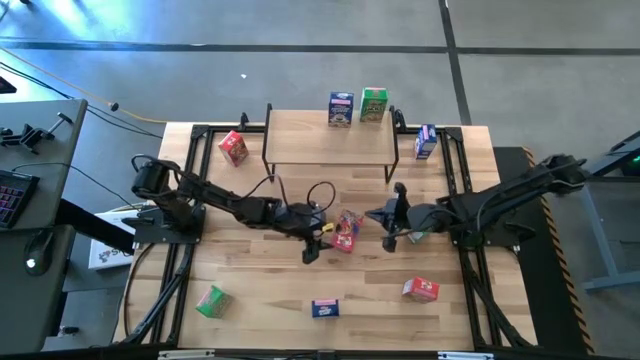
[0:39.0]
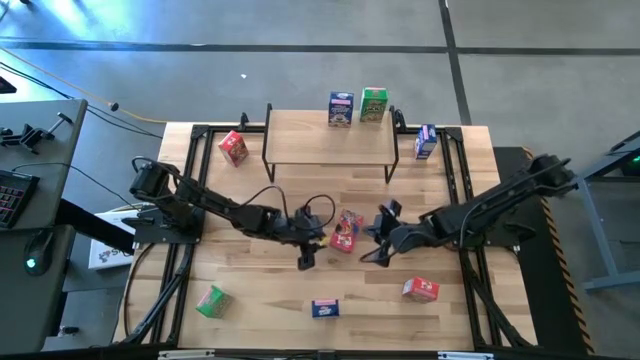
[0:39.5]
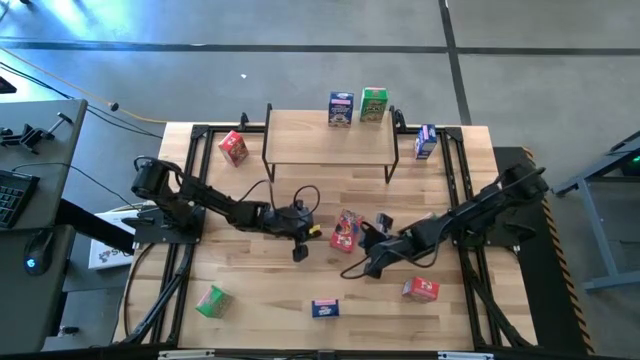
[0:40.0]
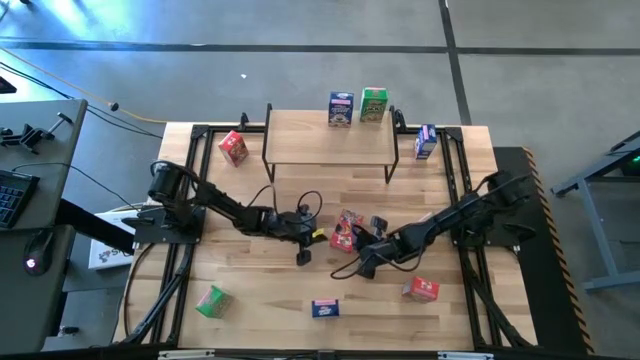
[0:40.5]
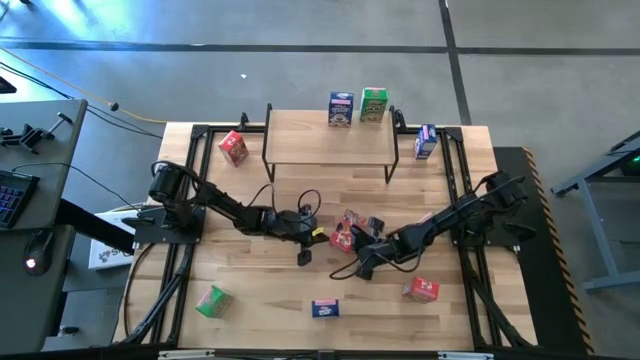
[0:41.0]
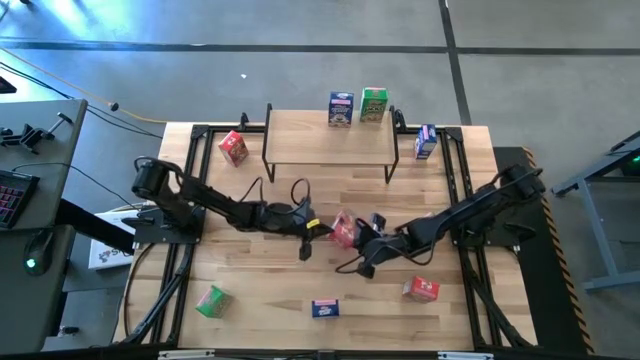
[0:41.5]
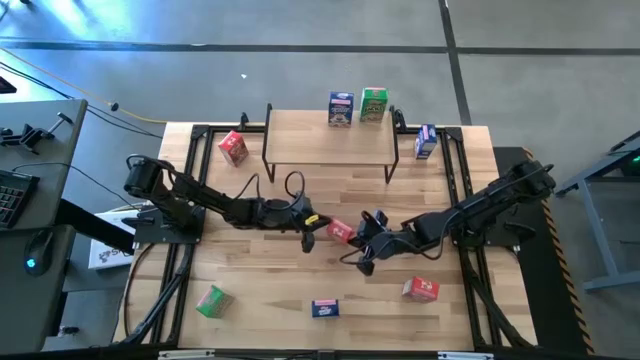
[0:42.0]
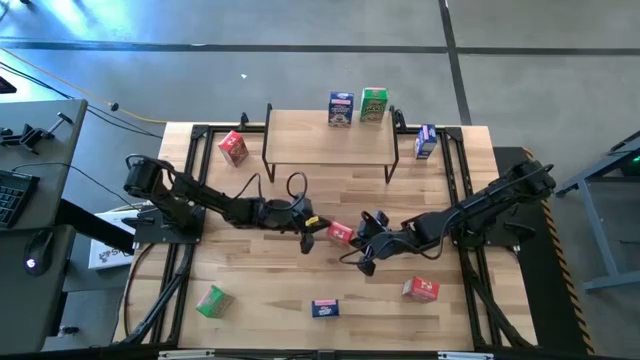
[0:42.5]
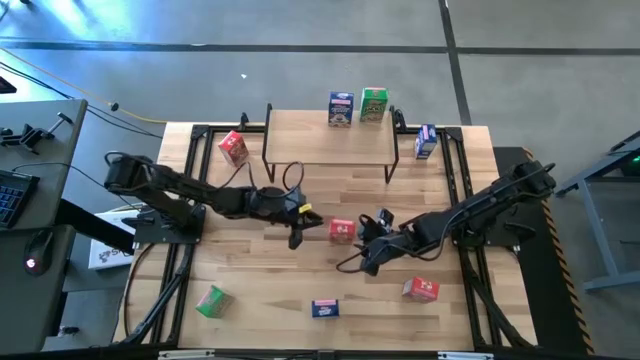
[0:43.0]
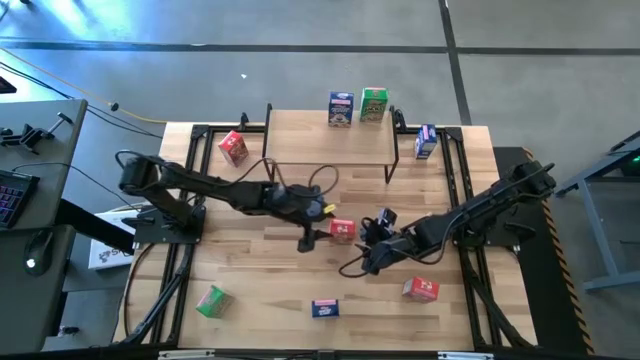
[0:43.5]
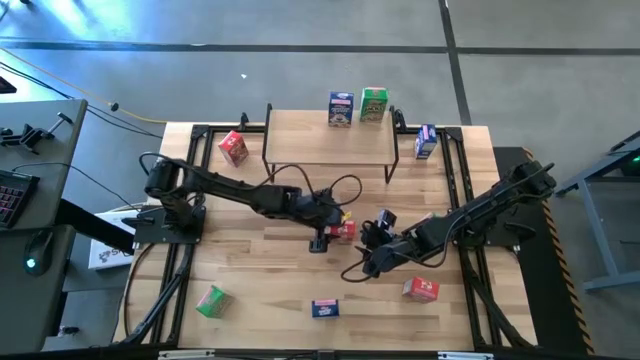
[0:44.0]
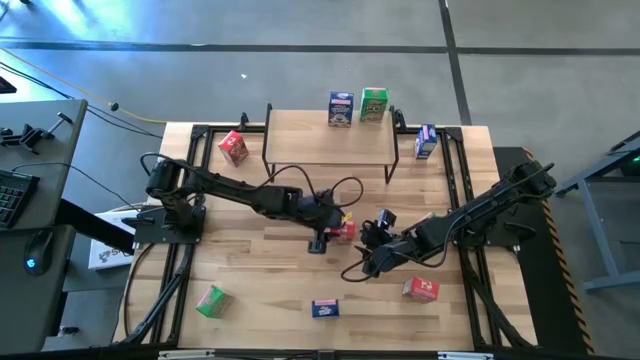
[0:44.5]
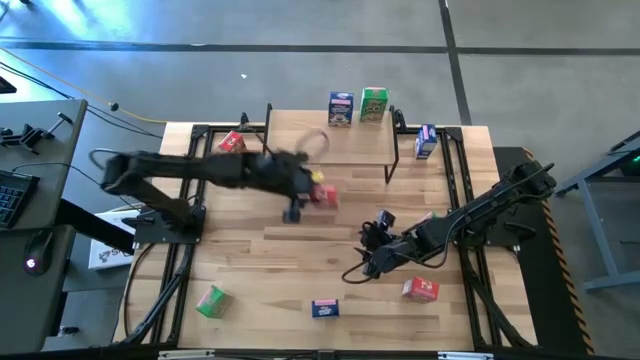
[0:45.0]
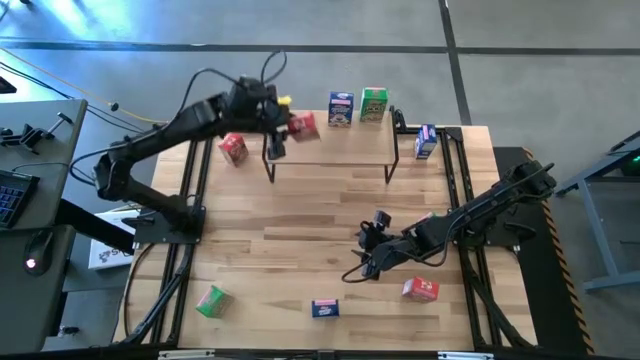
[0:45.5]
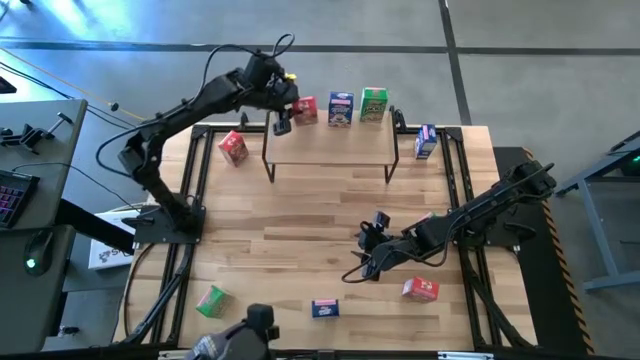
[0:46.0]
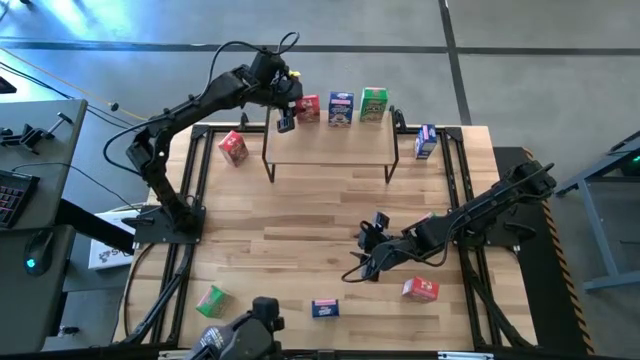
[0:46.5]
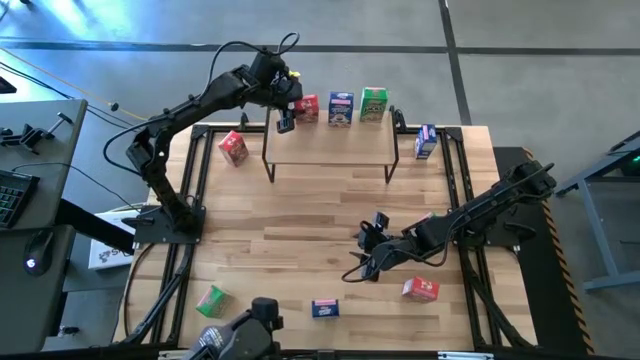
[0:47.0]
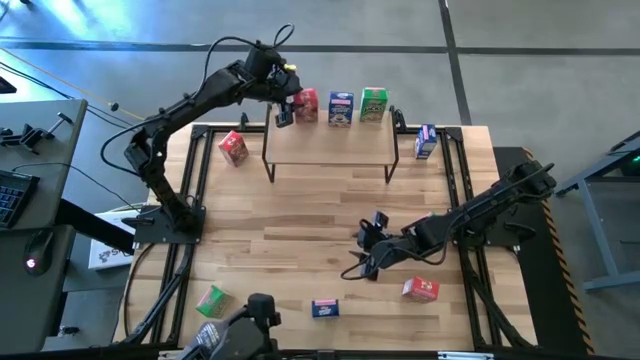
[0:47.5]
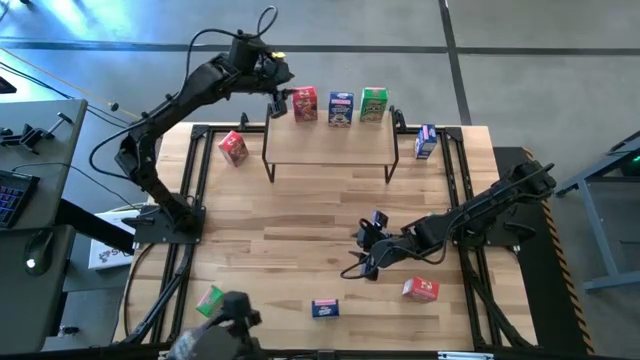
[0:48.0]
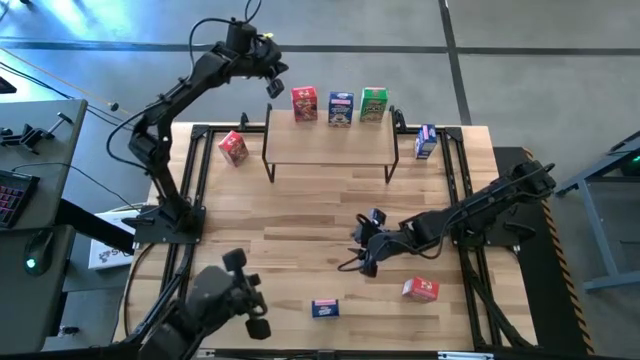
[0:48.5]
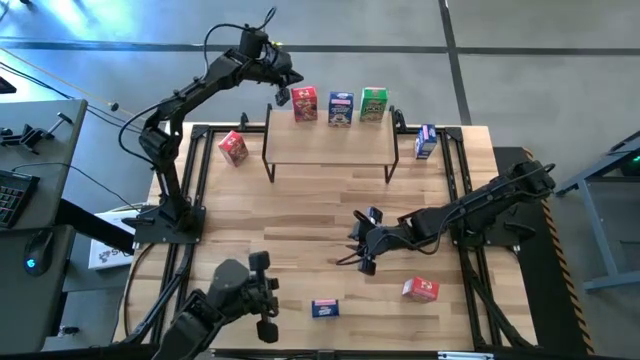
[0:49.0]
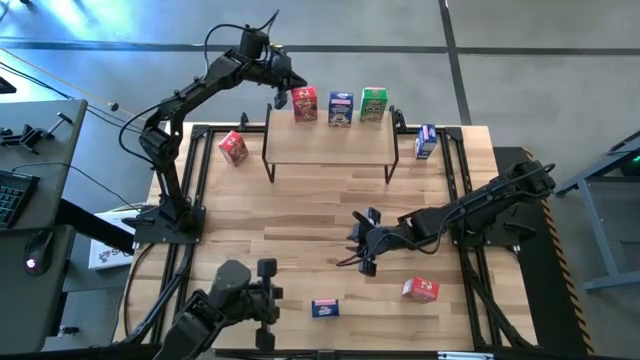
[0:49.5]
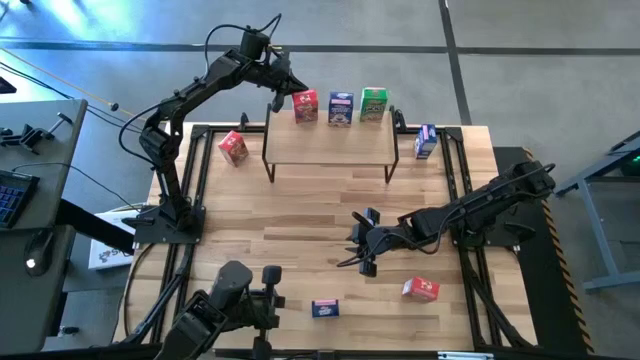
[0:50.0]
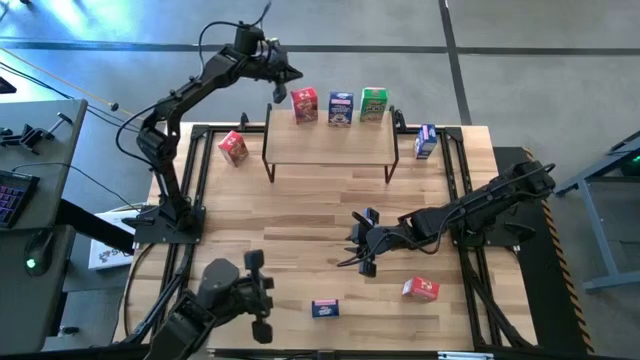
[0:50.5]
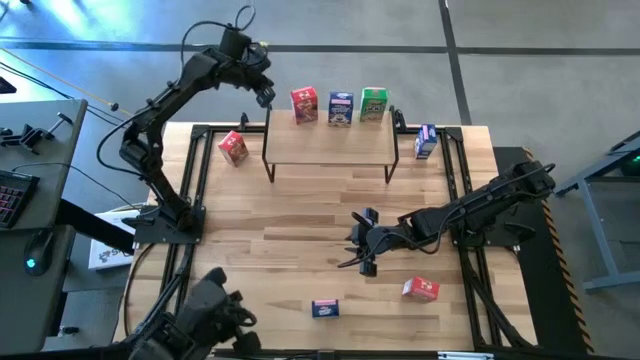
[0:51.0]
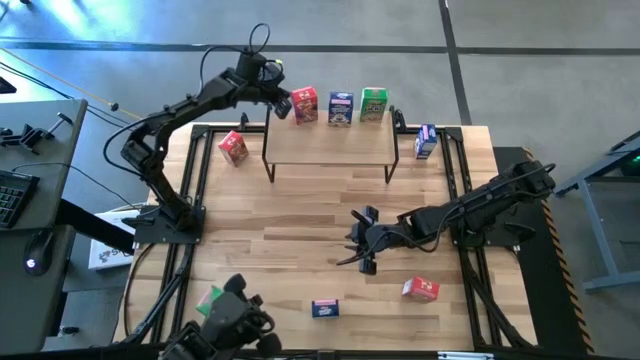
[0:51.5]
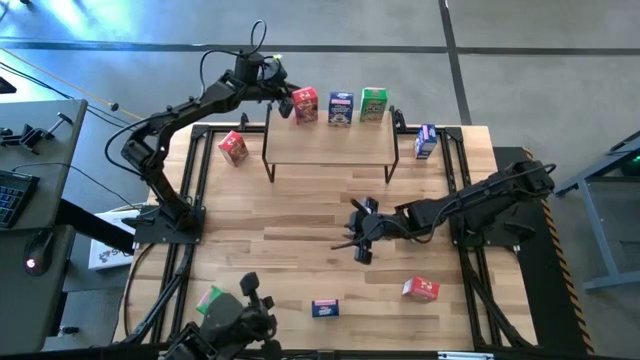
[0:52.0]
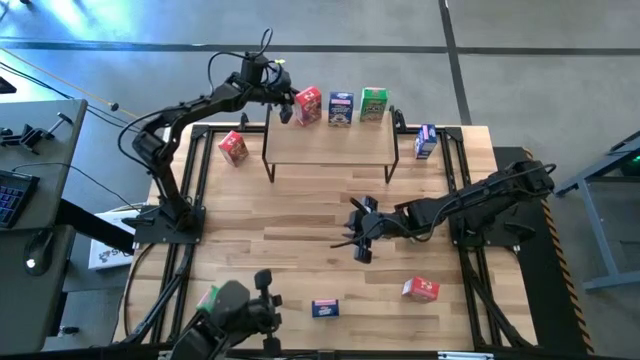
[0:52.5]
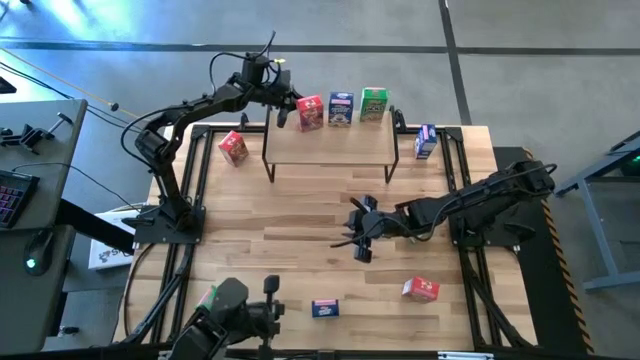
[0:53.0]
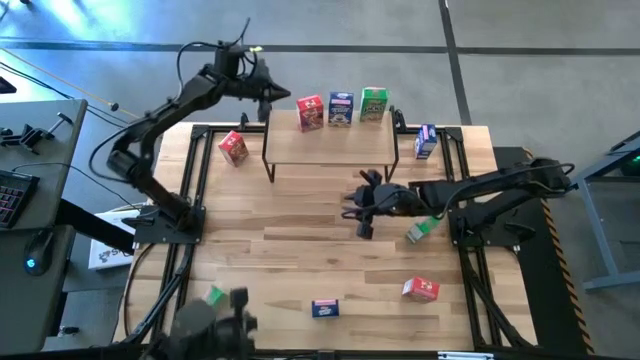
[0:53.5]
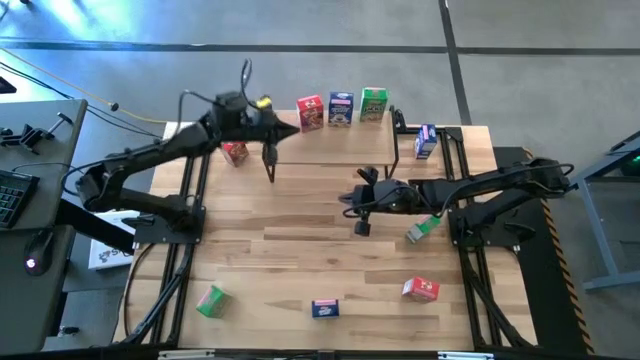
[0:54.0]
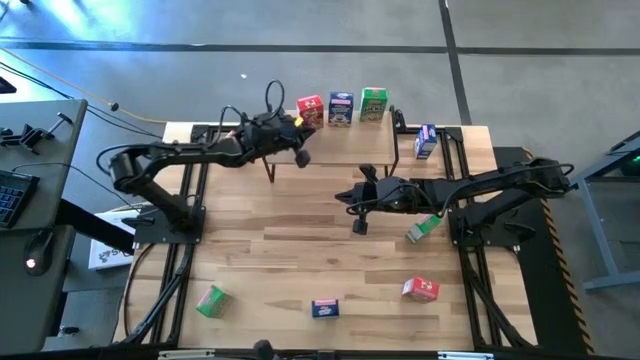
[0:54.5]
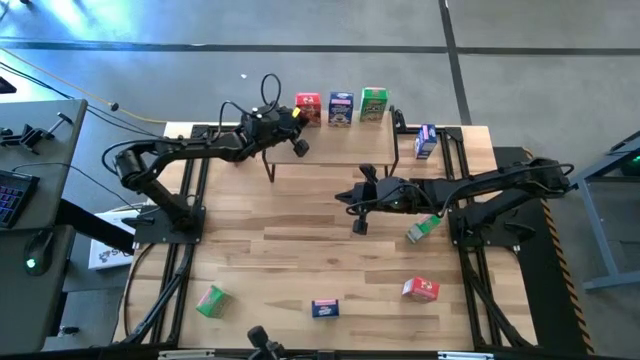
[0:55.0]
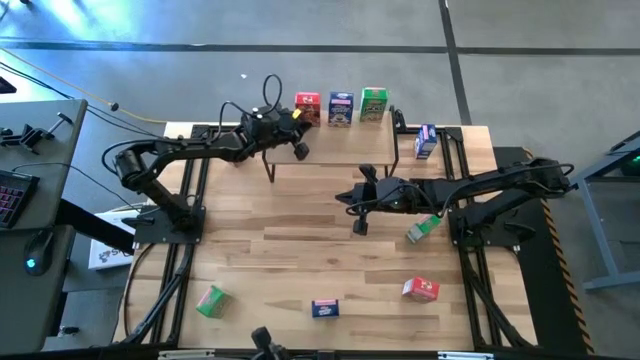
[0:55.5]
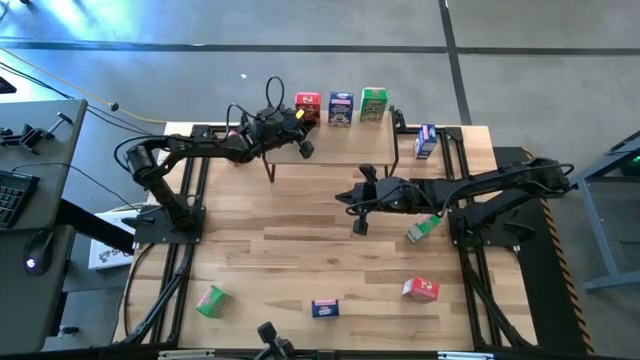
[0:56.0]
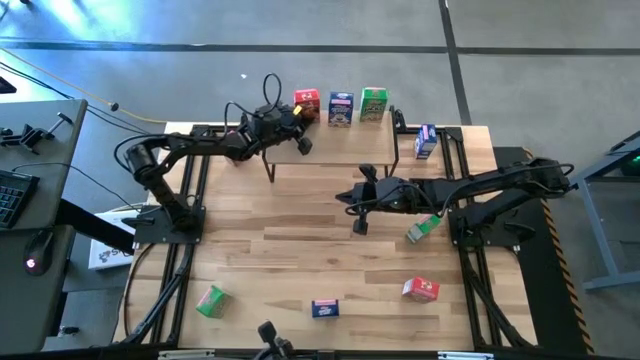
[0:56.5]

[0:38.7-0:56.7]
Task: Stack cereal on shelf
Put the middle red cereal box on the shelf

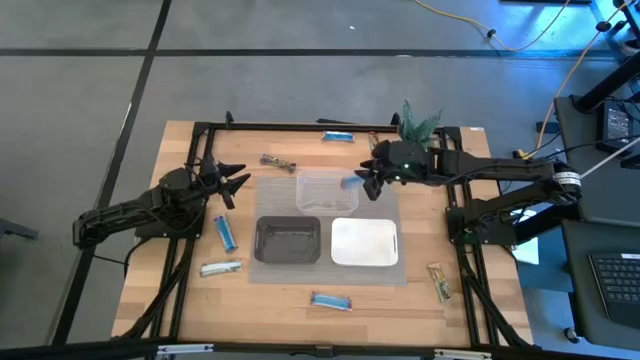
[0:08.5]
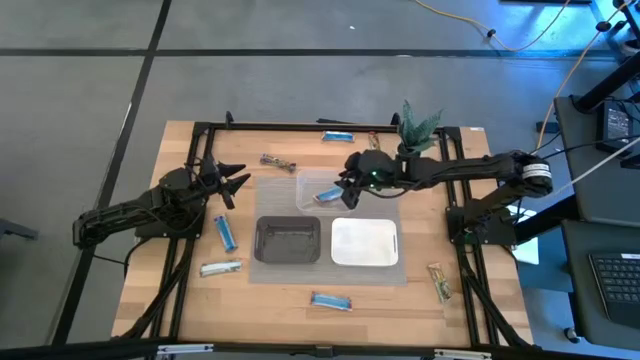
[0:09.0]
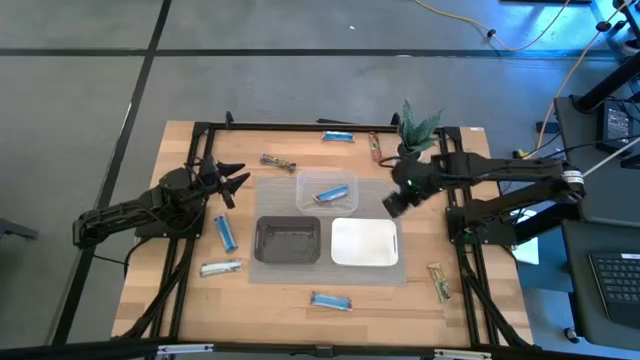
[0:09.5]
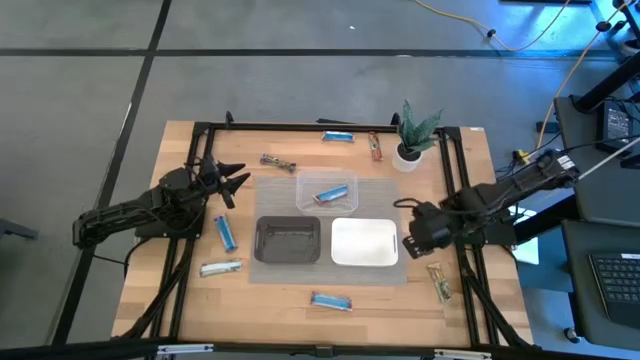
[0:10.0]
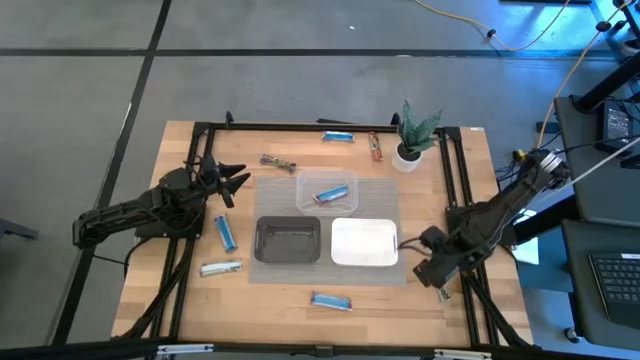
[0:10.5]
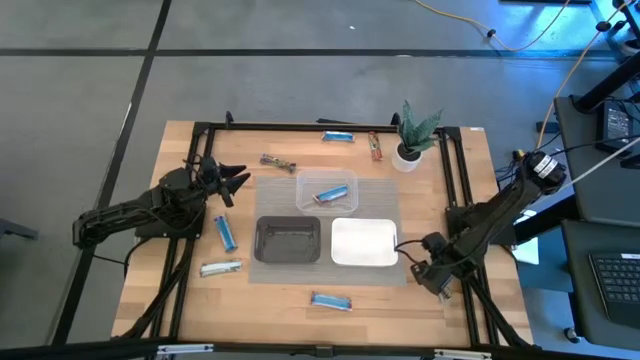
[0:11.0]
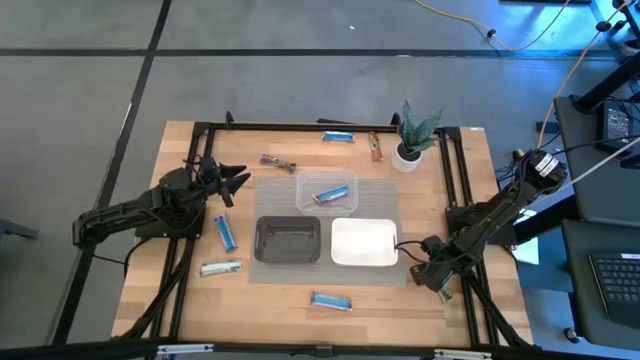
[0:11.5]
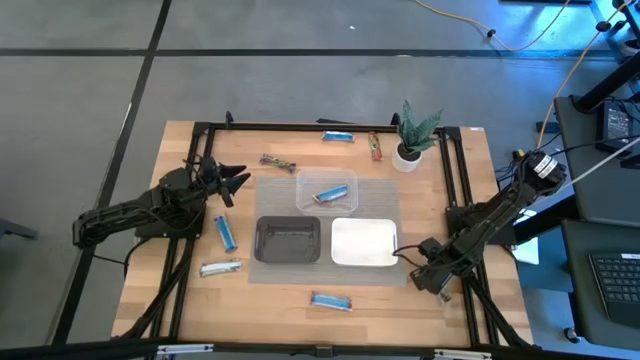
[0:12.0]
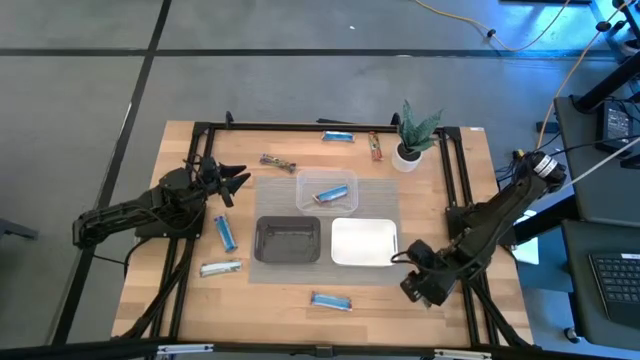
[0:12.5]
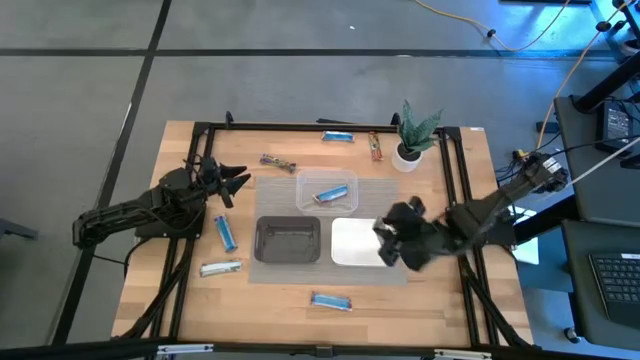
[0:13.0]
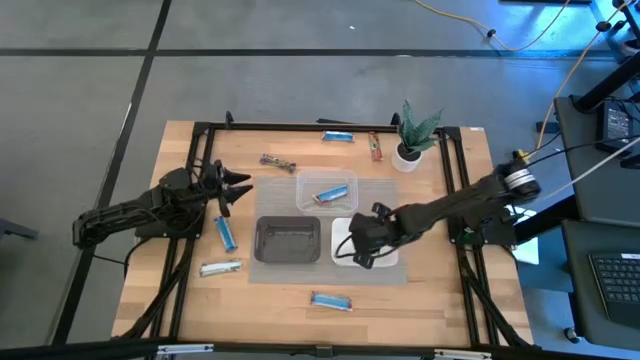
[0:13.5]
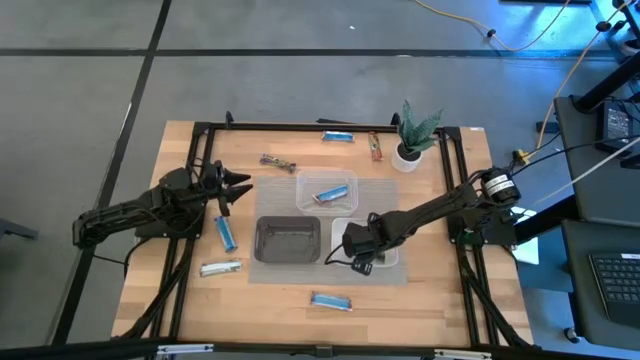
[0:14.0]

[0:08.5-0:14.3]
Task: Pick and place Granola Bars by type
Put the bottom right yellow granola bar into the white bin
